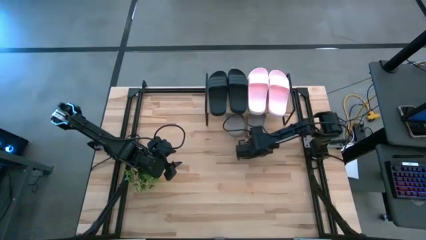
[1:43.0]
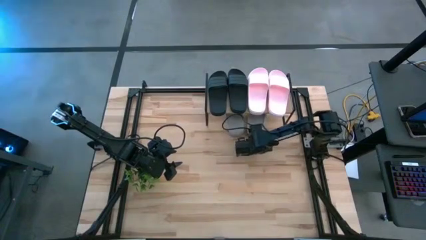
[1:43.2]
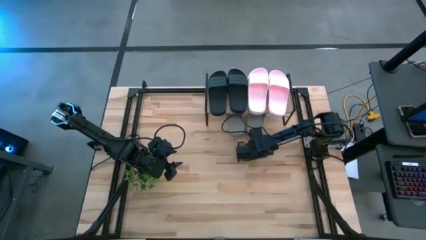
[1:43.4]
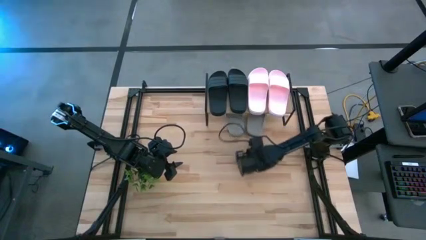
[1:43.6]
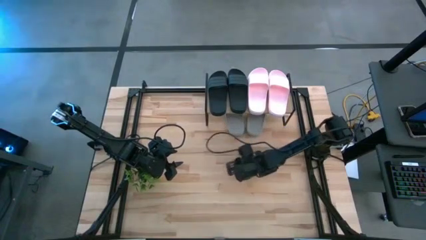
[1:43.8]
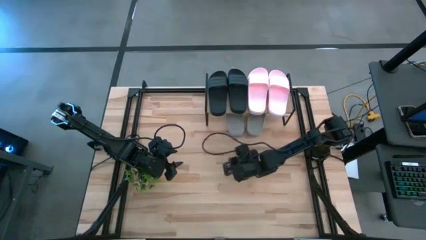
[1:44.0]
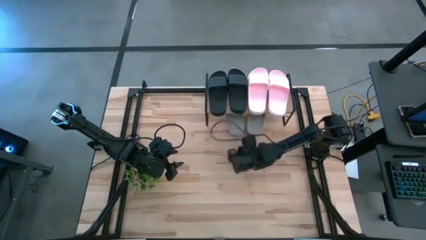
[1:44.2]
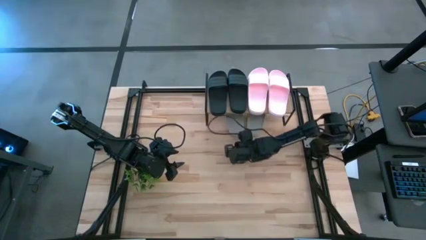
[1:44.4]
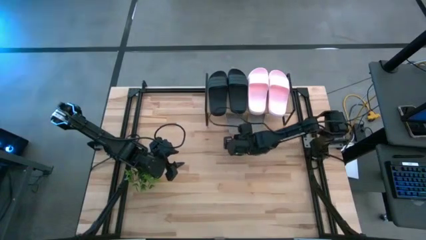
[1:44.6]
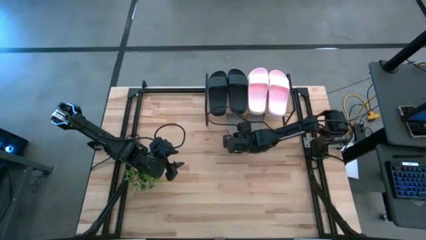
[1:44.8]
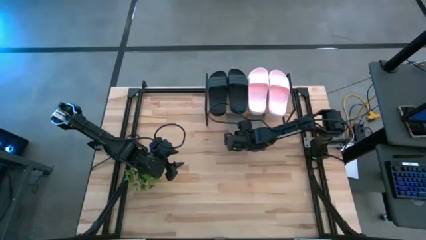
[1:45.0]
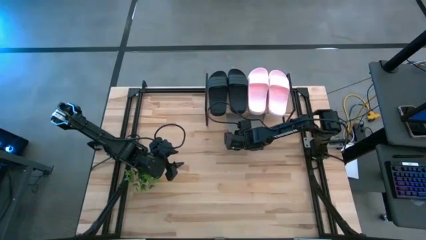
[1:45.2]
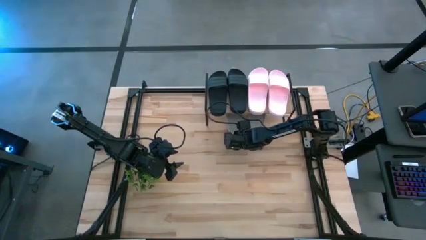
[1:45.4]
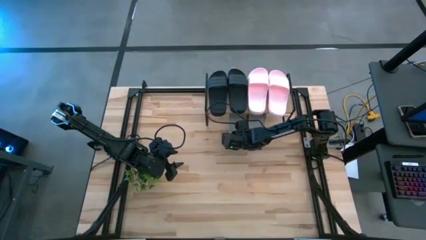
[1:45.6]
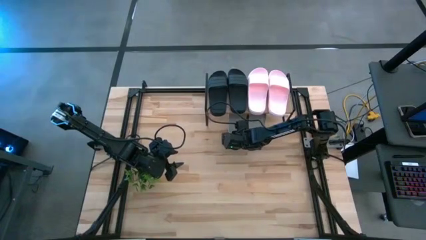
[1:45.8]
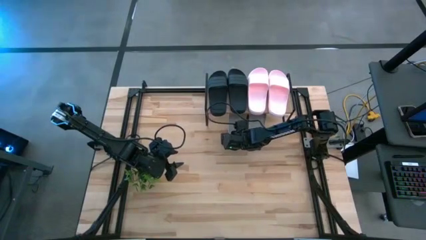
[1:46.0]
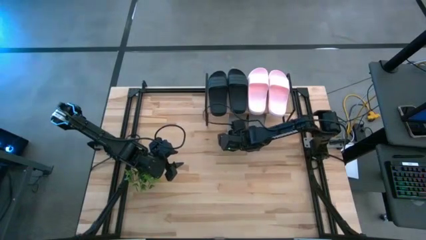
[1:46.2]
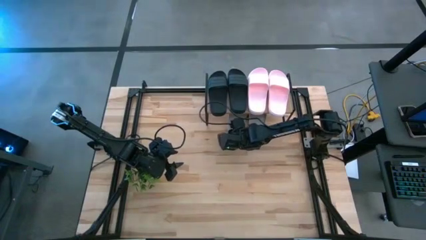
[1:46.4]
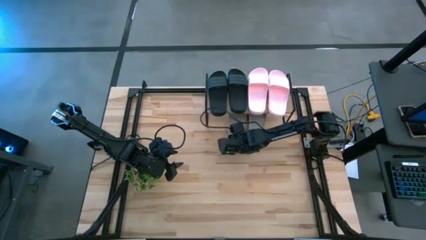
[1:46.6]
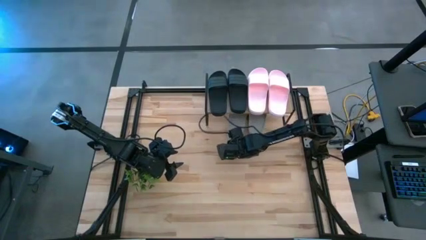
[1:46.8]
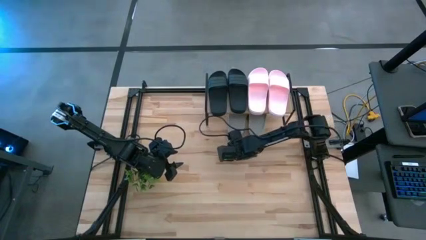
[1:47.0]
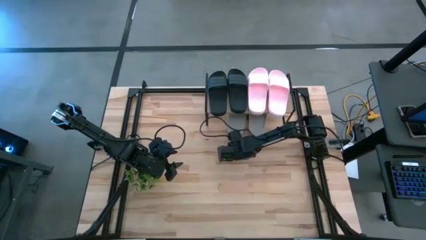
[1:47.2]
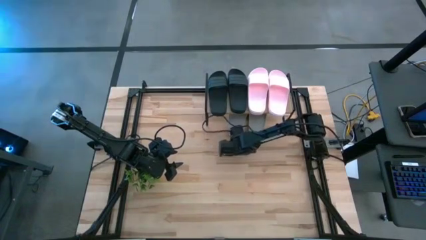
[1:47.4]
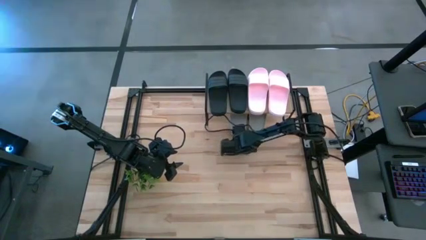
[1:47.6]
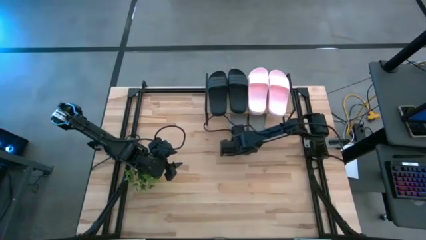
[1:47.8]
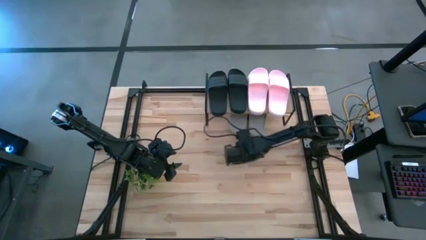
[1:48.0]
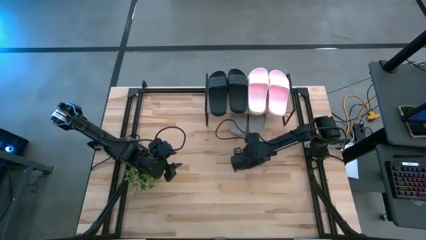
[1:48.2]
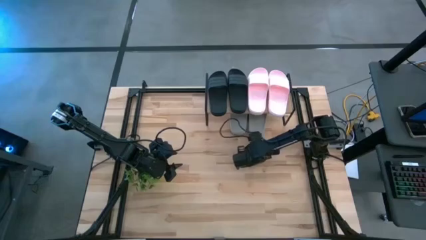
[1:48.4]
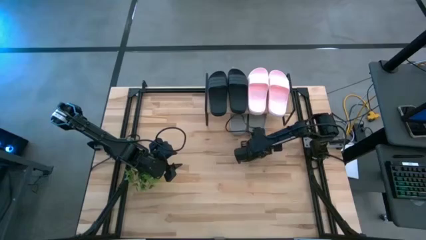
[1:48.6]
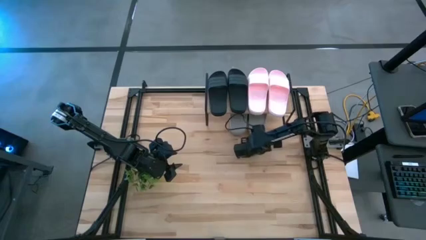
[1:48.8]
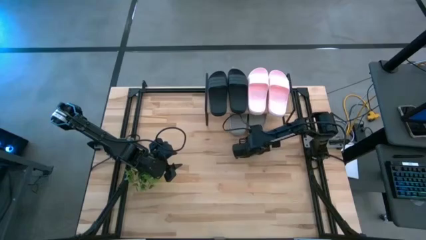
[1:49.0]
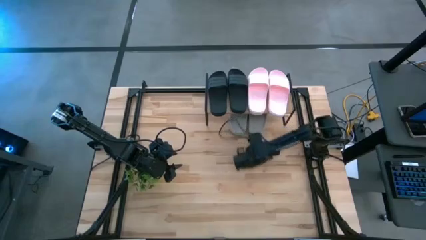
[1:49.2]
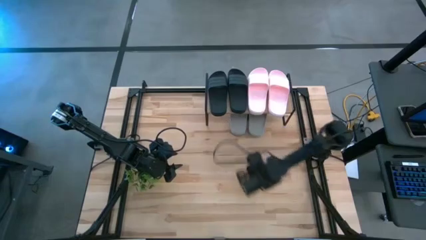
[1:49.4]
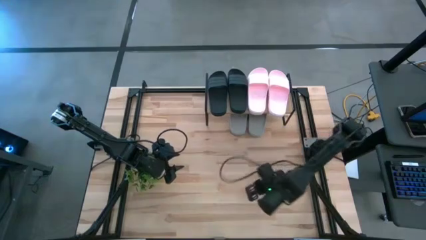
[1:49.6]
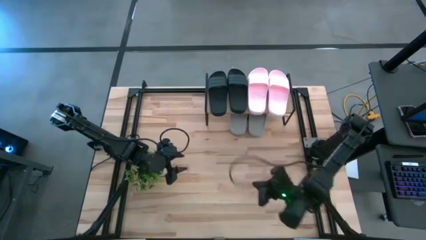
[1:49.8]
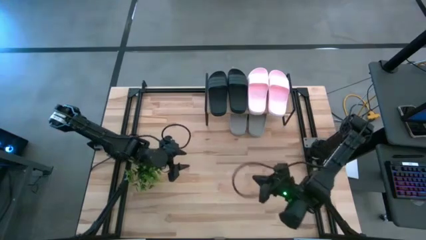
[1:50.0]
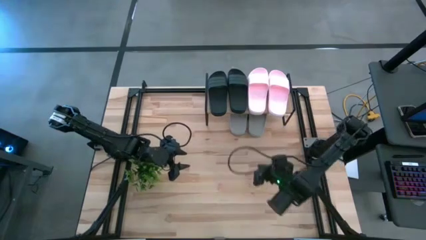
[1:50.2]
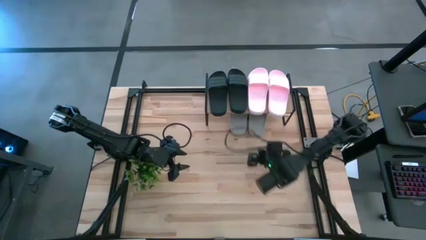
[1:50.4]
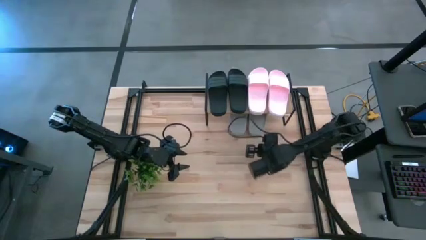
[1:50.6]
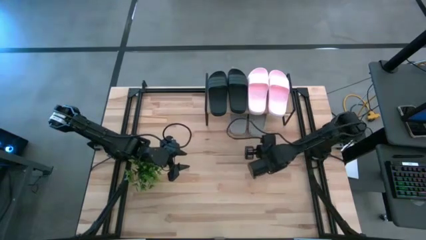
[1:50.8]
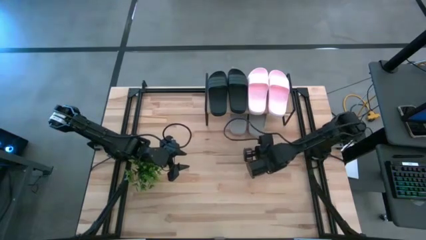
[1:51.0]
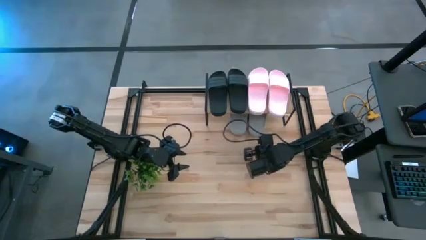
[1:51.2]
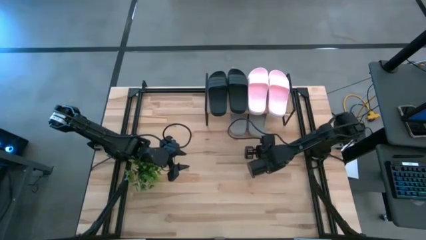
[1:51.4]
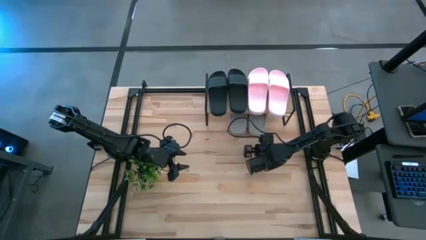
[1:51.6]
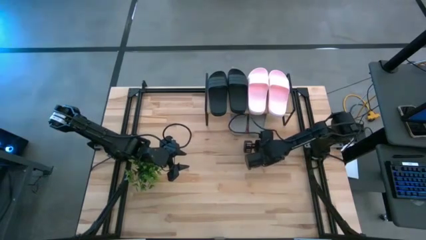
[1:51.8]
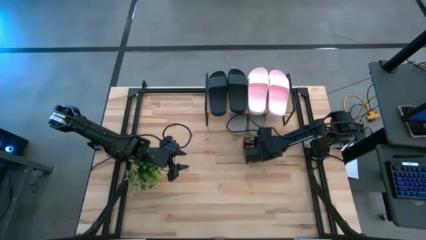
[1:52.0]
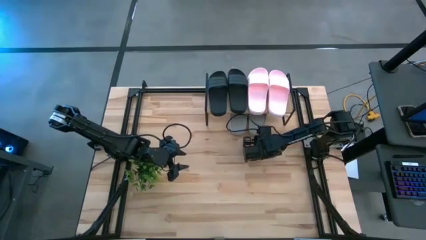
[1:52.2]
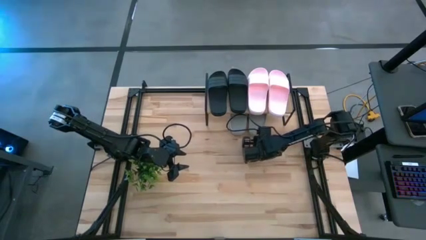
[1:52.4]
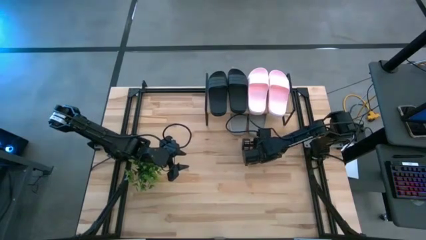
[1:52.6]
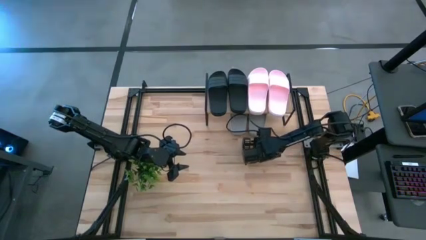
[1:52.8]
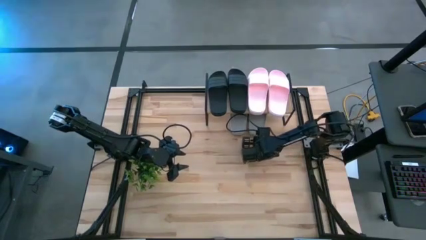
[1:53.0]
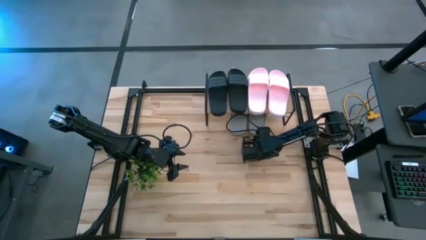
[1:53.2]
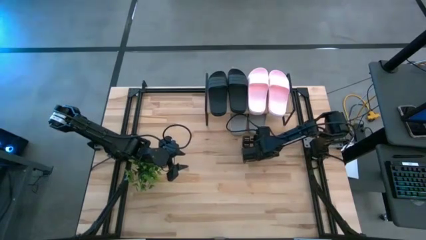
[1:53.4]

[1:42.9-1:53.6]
Task: Pick and place slides into the shelf
Adjust the gray slides under the shelf
